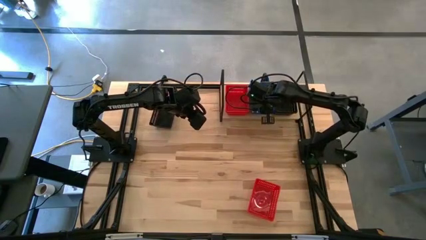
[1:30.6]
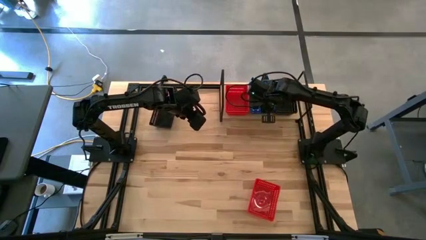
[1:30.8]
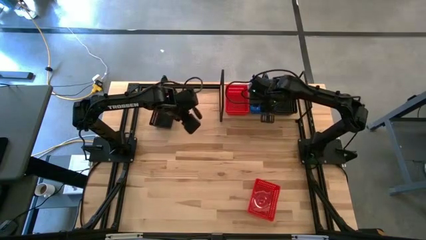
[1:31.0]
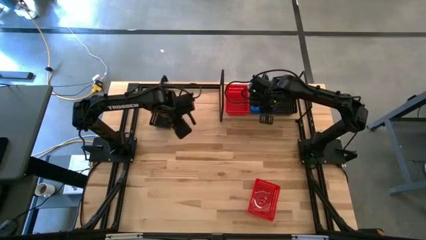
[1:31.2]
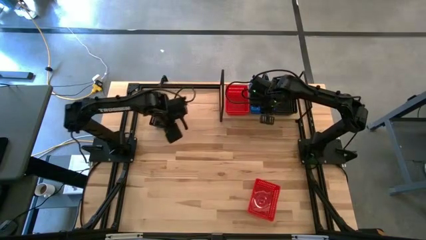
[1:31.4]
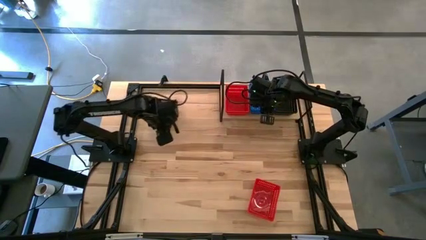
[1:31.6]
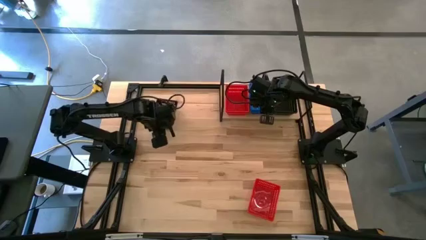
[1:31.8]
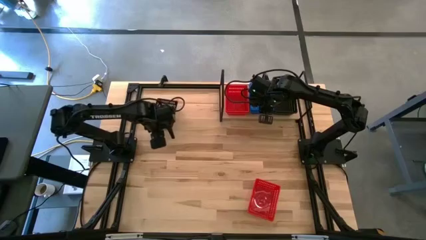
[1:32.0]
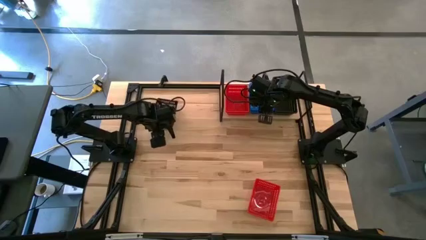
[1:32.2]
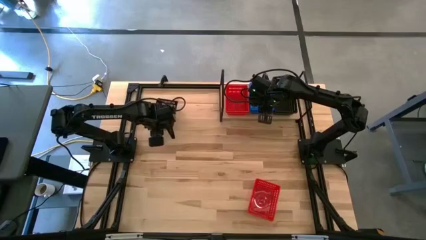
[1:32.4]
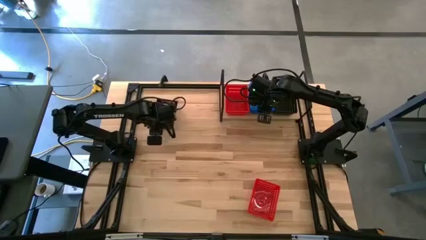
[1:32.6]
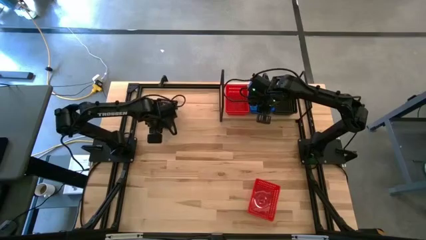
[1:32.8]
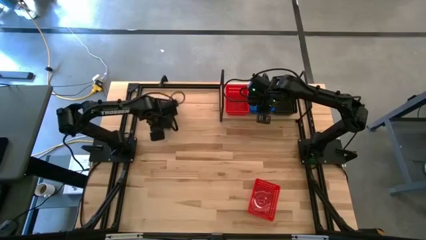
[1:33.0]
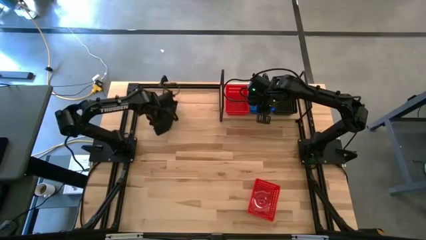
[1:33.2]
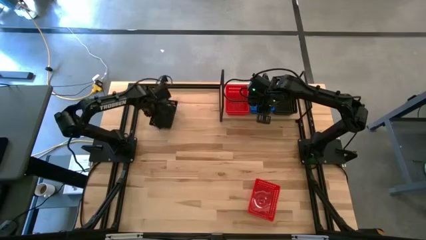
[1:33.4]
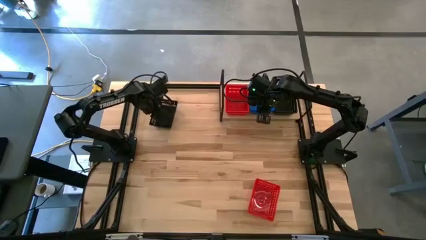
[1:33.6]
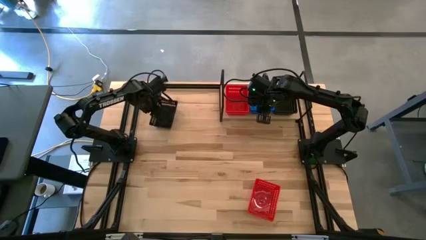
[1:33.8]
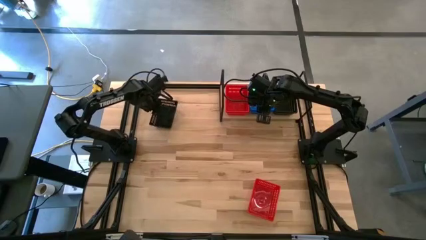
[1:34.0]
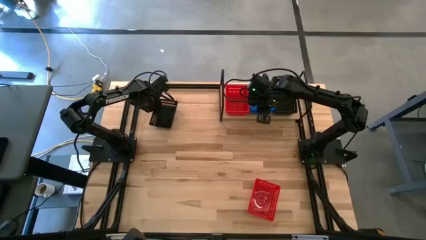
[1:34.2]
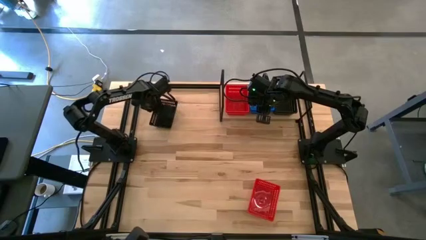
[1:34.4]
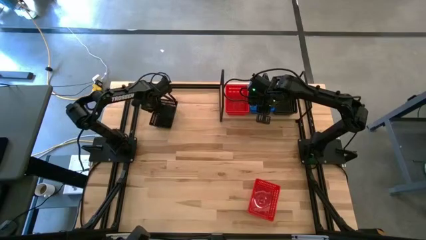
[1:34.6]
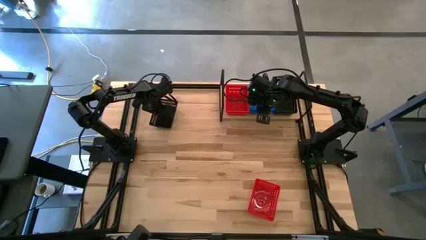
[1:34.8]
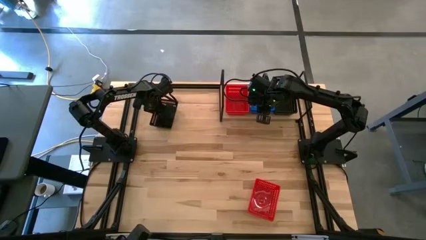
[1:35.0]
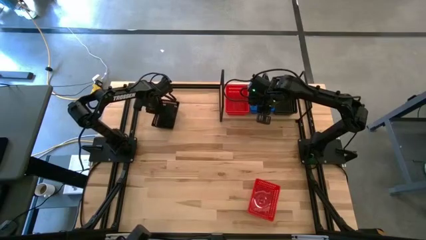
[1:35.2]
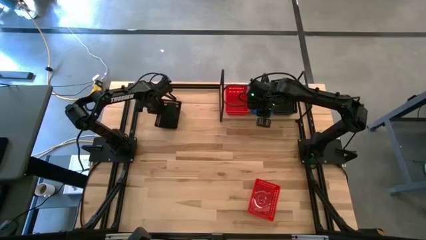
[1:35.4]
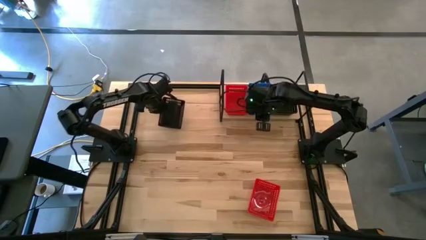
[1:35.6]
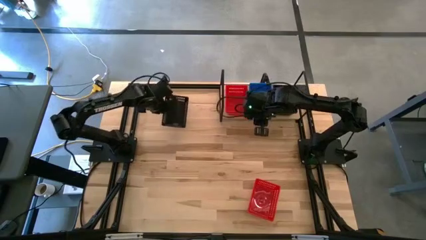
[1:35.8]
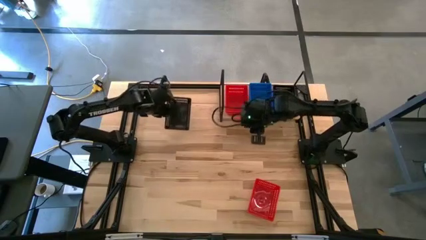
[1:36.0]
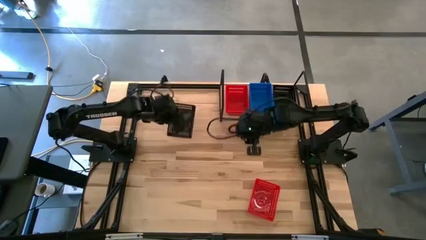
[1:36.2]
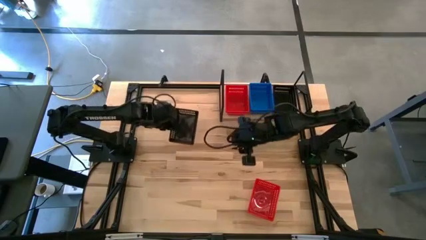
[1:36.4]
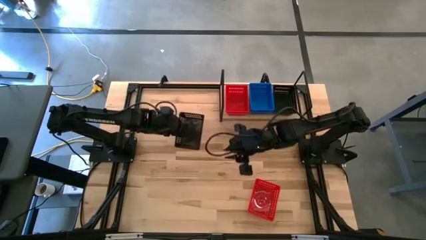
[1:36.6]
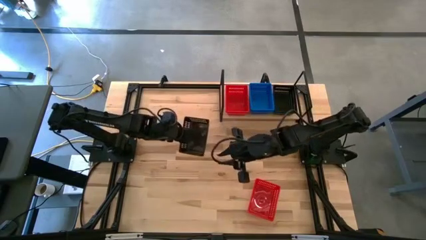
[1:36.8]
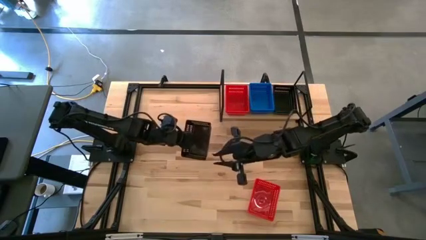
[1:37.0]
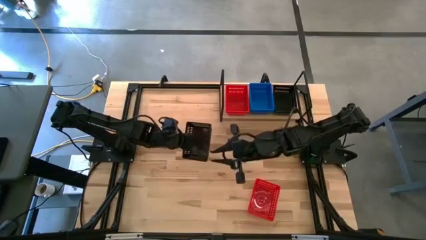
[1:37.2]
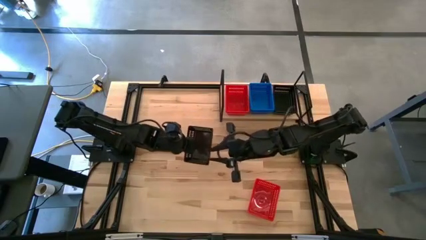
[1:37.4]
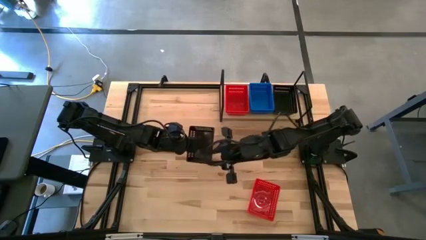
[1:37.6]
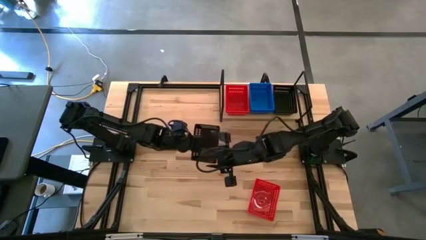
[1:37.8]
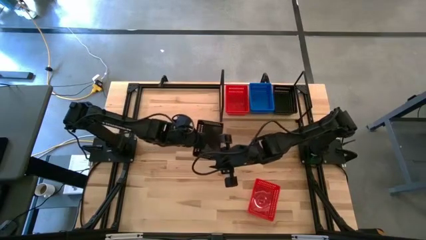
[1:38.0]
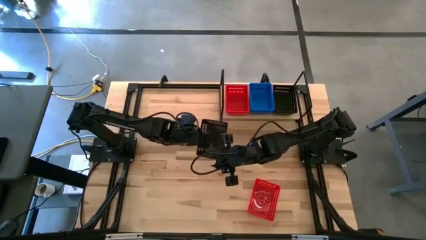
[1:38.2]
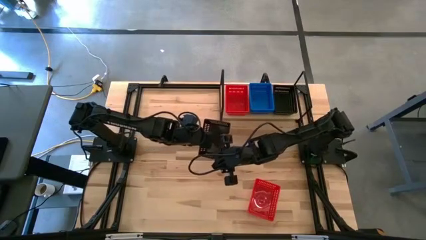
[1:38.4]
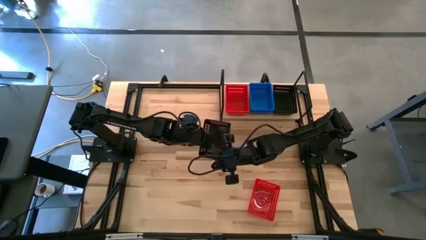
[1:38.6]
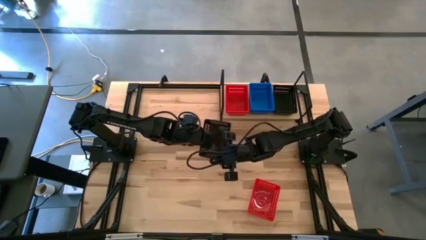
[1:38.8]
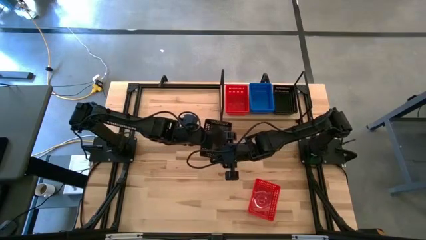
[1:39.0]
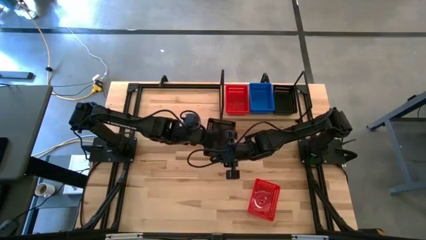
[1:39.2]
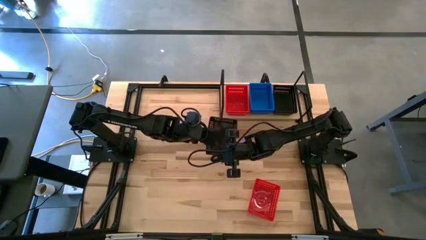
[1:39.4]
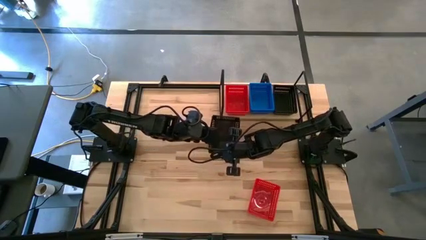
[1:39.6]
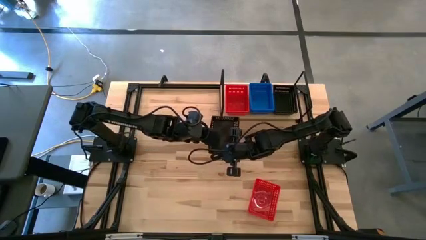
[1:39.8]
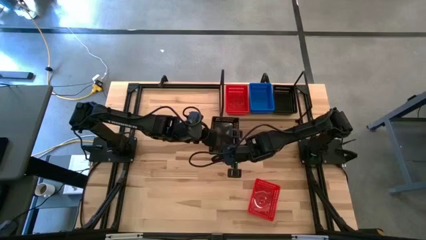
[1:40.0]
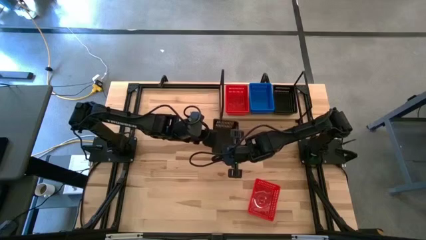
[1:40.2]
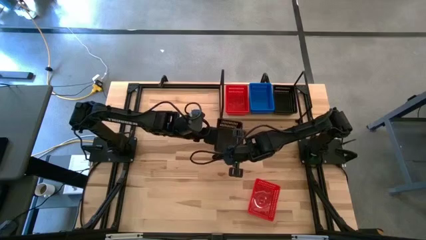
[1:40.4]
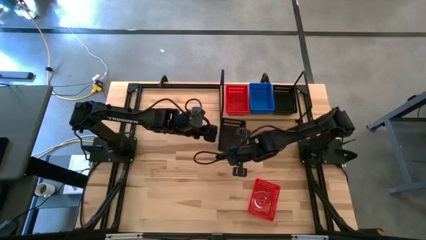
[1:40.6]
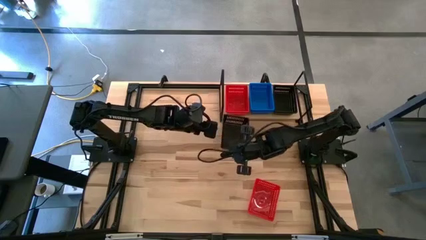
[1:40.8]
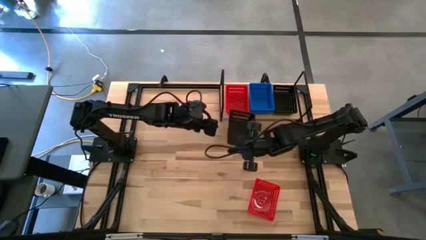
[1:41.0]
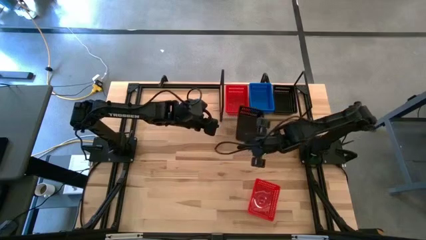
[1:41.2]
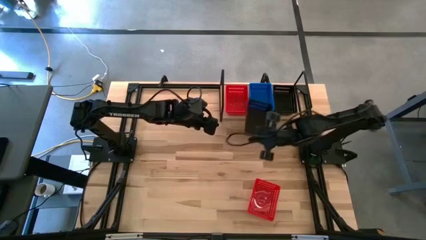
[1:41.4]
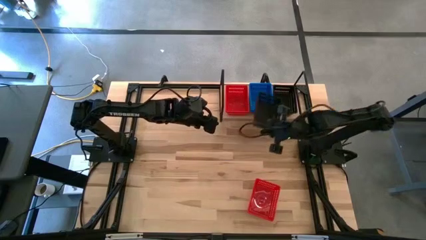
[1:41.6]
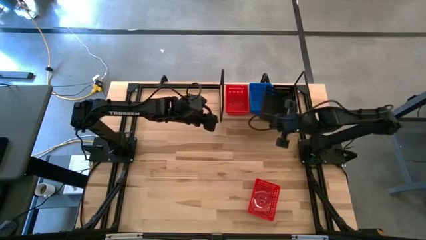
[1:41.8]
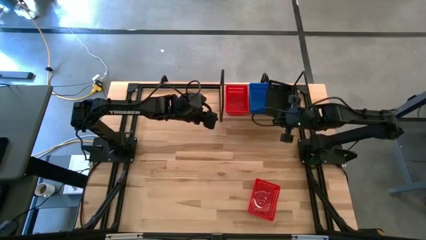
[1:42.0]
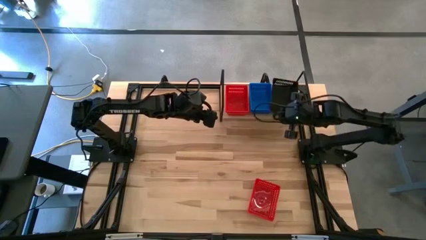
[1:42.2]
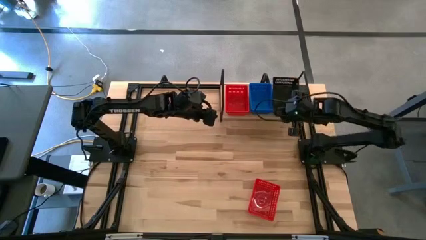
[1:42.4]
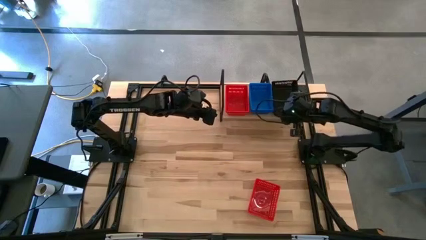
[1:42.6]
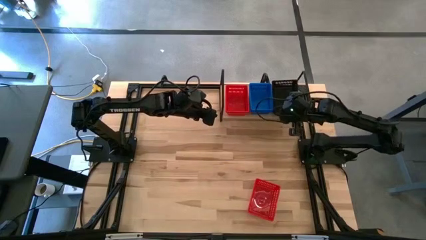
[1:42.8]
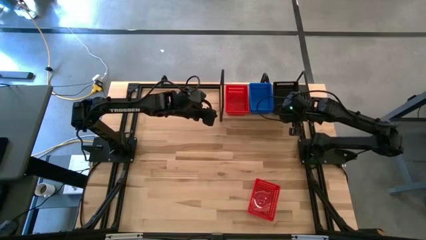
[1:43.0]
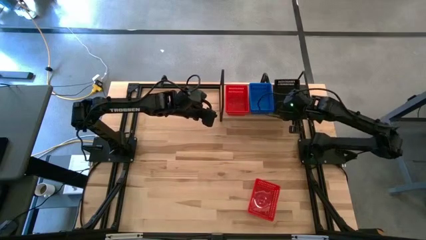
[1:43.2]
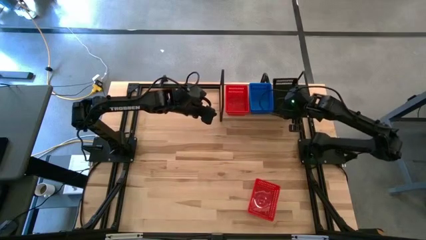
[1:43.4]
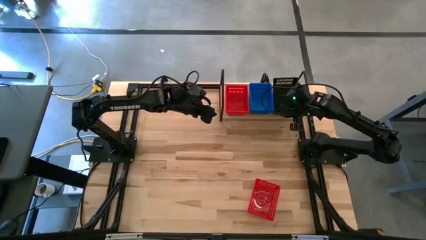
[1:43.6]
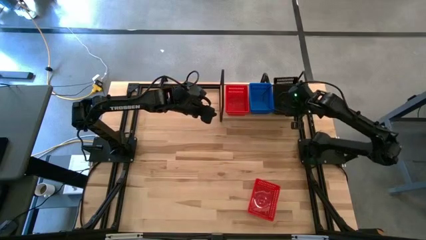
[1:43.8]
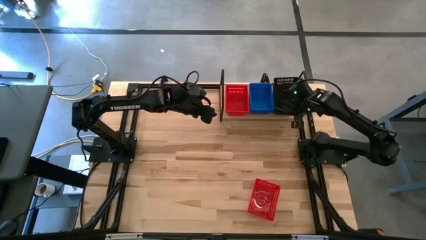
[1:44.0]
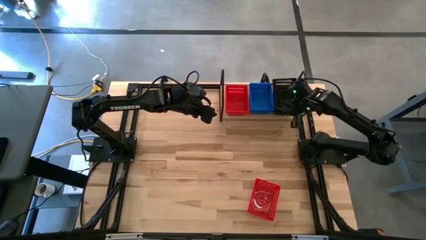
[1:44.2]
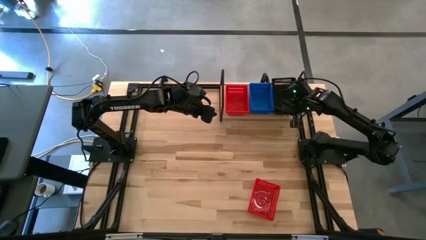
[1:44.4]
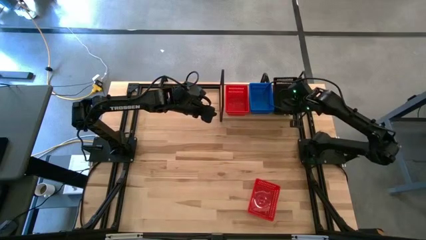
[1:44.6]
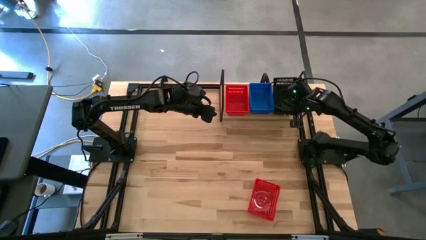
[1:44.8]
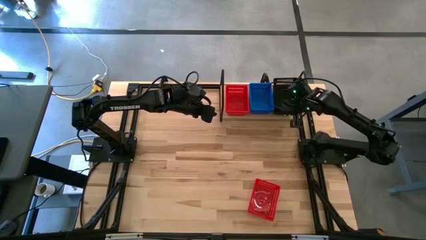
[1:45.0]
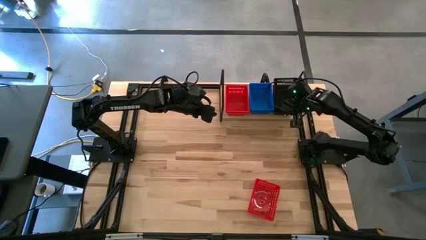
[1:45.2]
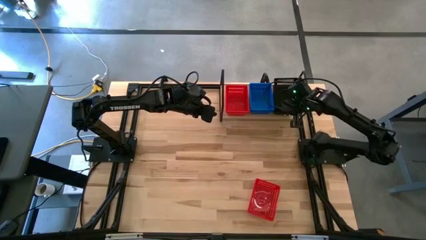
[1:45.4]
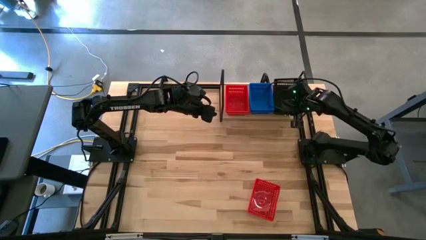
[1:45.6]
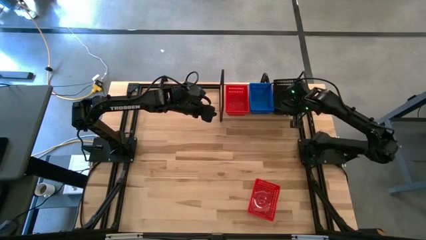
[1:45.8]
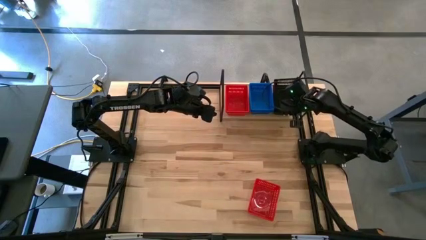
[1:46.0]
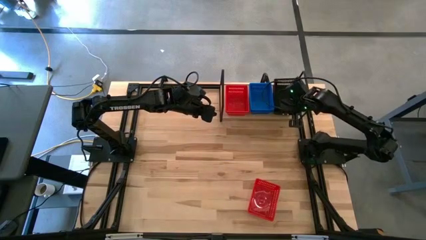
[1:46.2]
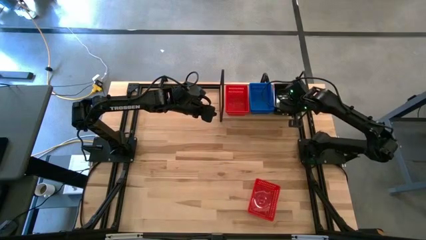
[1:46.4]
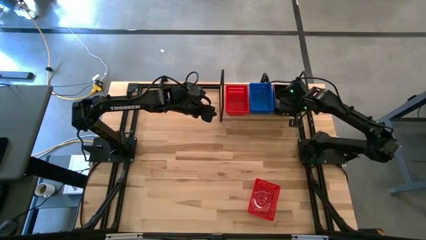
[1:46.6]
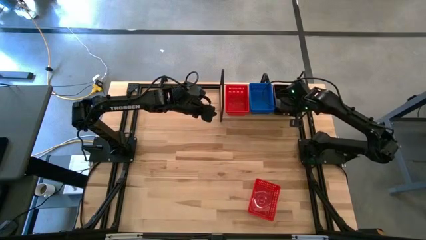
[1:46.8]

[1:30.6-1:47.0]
Task: Stack baskets on shelf by color
Stack the black bin on top of the black bins on the shelf
